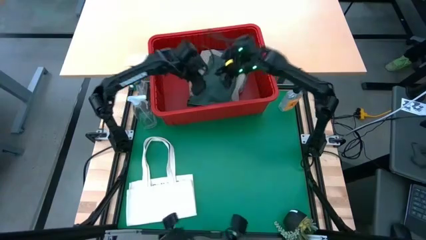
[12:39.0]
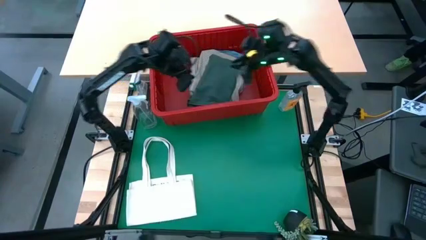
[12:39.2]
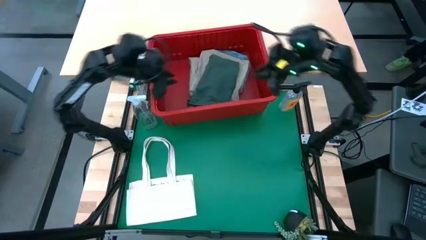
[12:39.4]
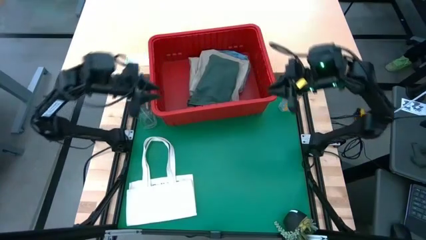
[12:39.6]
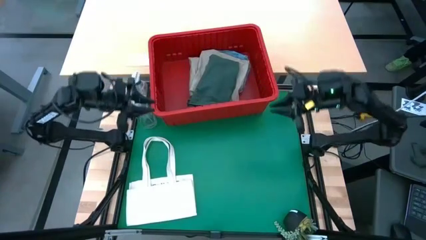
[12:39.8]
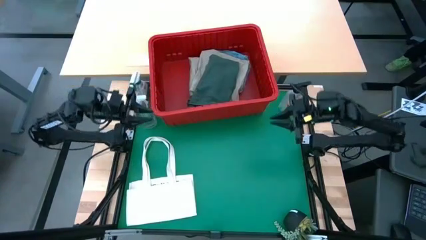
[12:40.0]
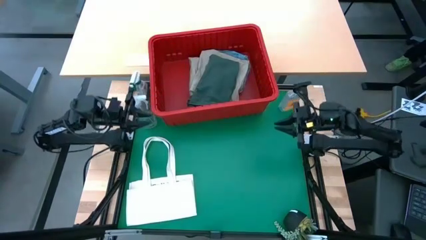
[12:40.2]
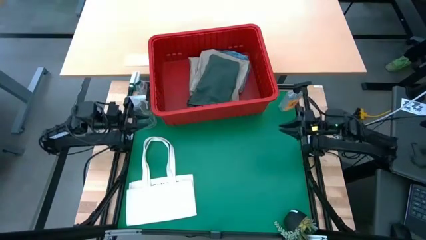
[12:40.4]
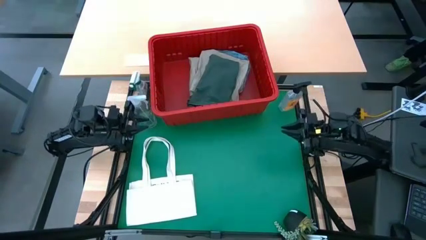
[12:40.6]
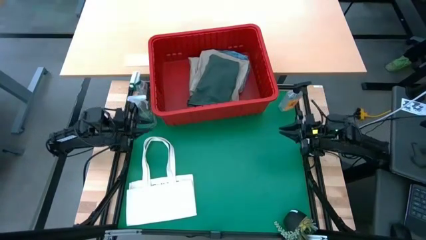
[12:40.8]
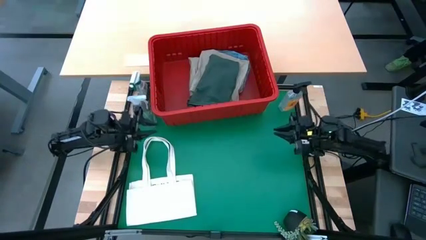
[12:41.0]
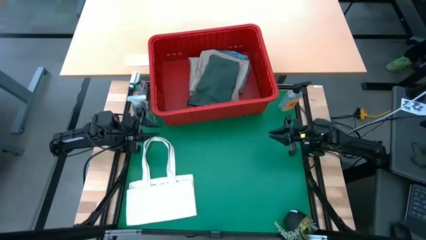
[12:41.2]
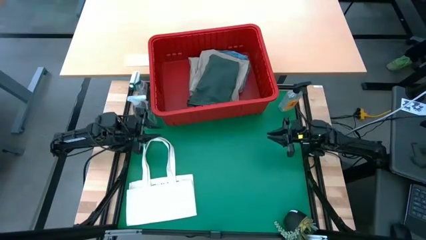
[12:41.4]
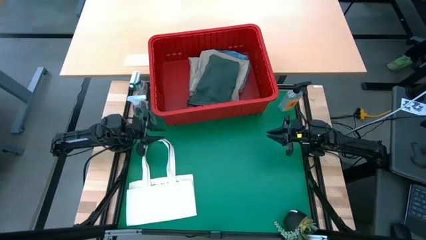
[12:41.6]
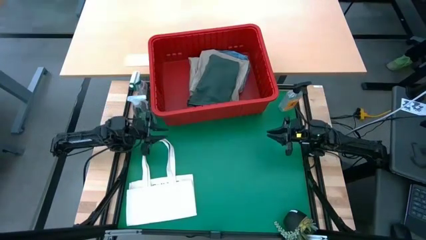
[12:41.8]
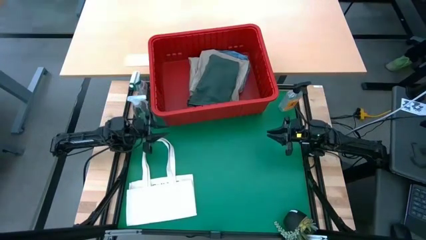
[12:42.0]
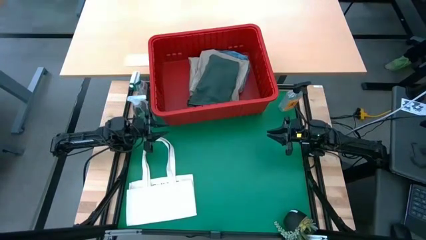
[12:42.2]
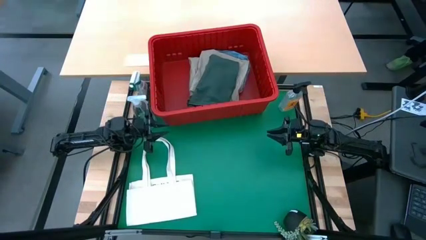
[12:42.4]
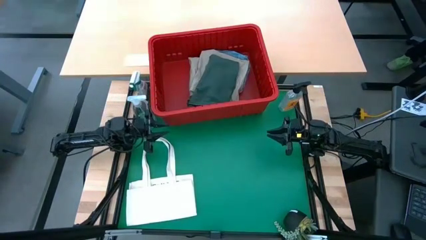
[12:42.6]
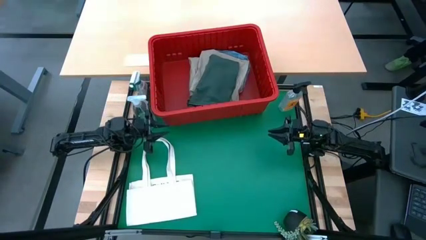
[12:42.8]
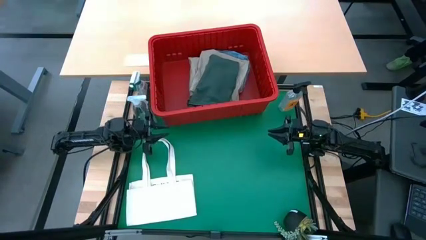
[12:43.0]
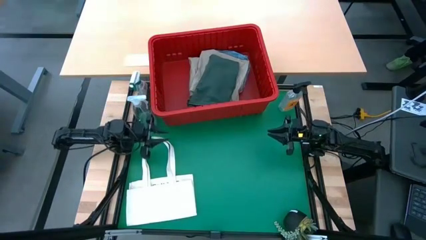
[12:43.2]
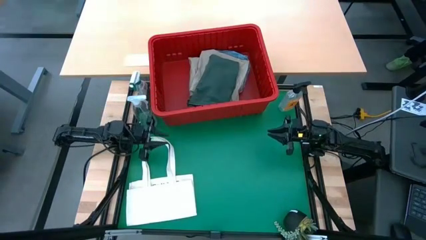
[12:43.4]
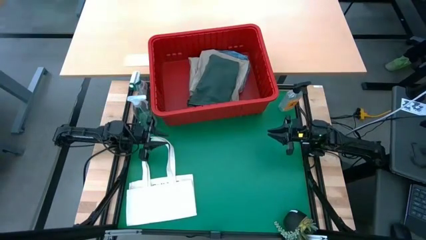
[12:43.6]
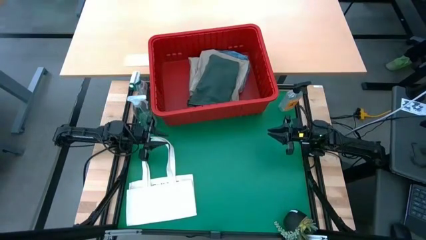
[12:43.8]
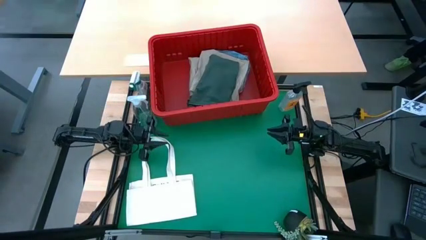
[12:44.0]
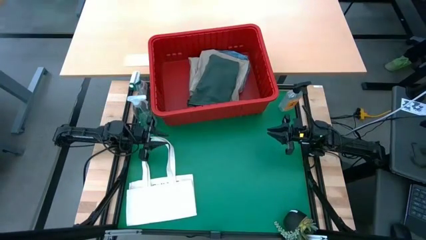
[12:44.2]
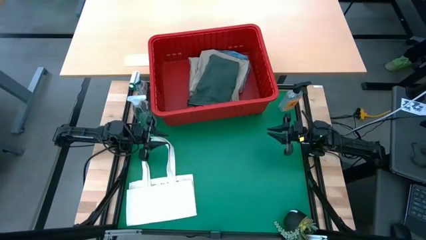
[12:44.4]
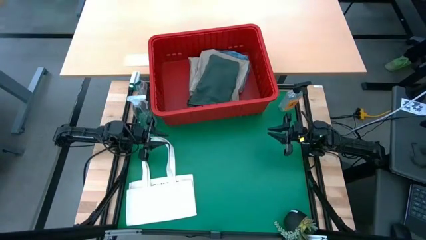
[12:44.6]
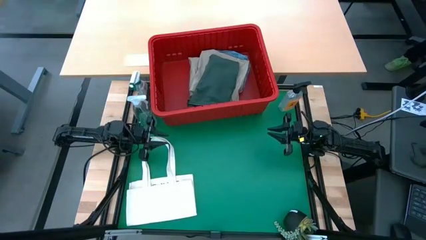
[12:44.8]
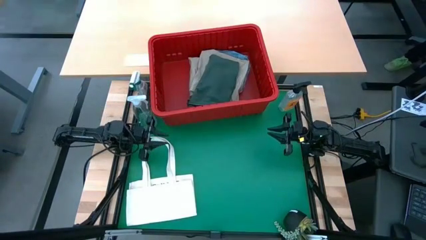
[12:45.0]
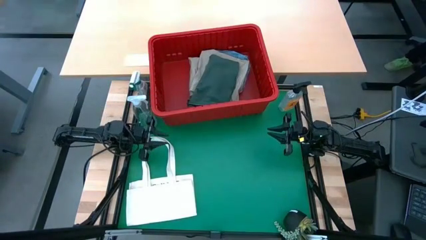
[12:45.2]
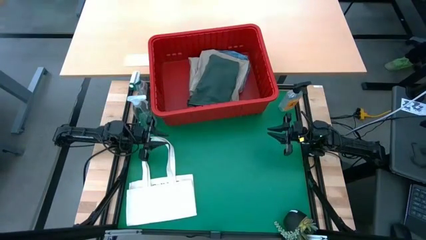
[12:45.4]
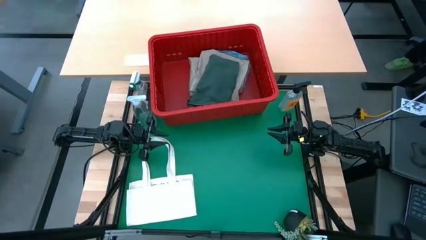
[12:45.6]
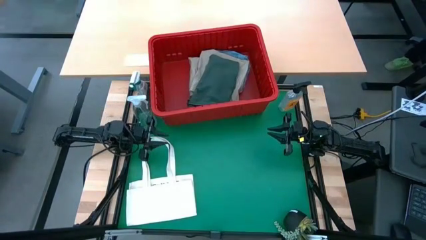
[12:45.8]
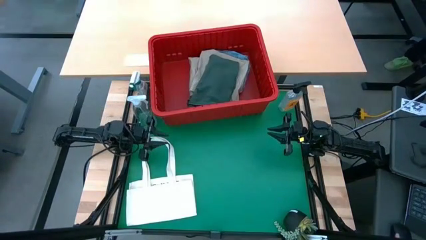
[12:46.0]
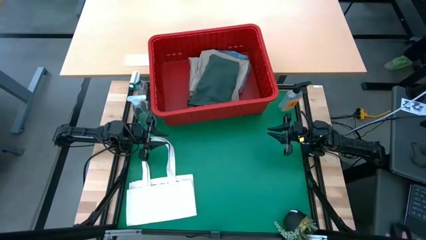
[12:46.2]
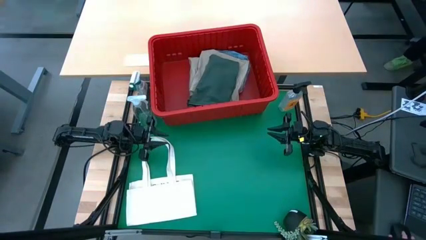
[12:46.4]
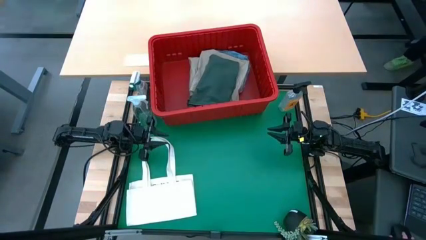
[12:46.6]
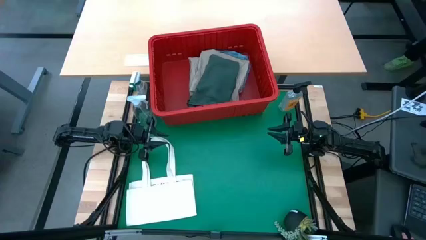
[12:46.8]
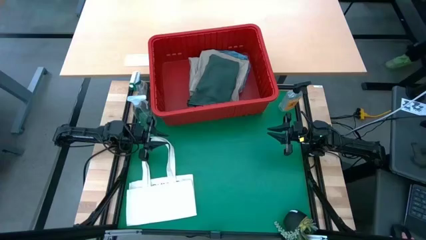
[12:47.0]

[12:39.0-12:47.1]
Task: Fold Laundry from Bin
Return to Home Position
